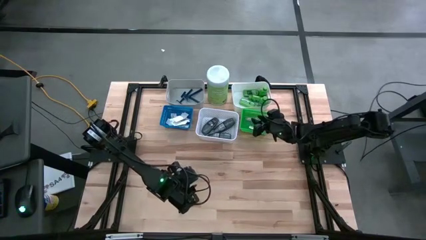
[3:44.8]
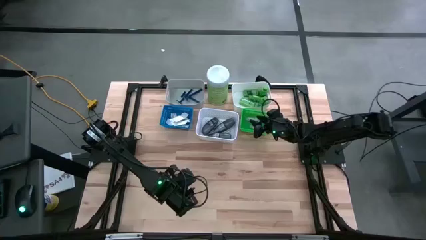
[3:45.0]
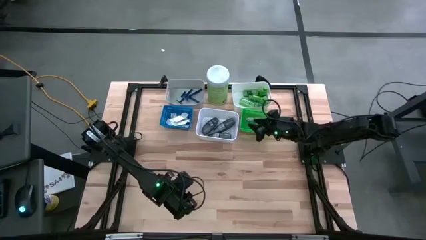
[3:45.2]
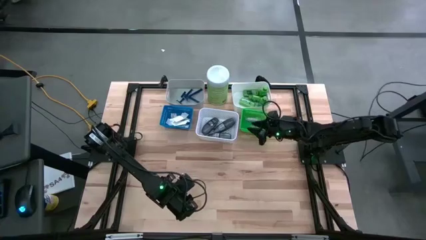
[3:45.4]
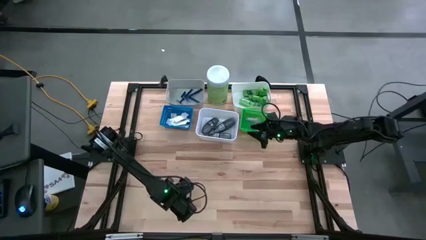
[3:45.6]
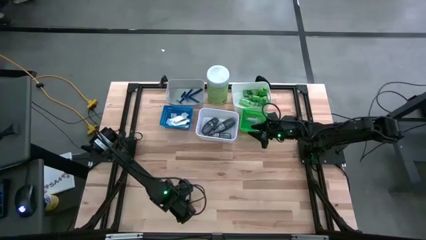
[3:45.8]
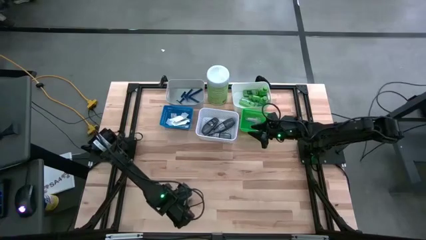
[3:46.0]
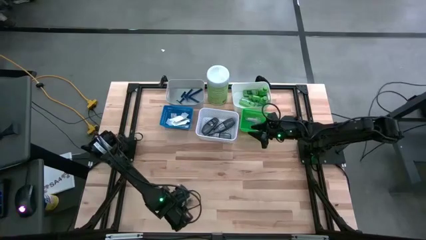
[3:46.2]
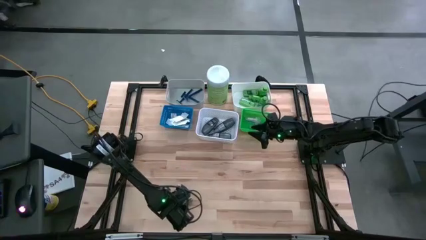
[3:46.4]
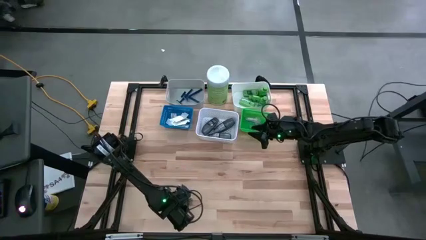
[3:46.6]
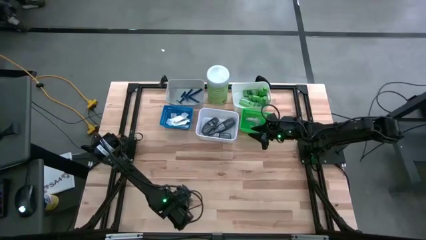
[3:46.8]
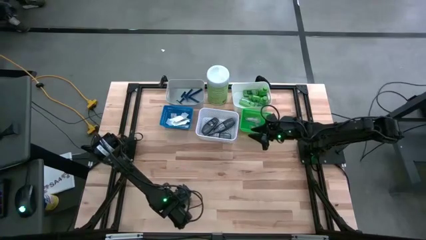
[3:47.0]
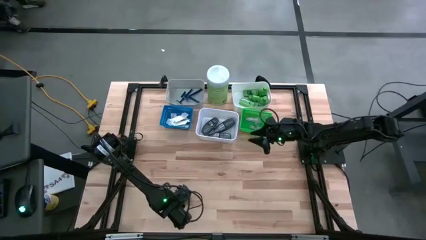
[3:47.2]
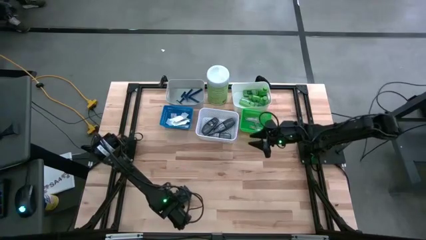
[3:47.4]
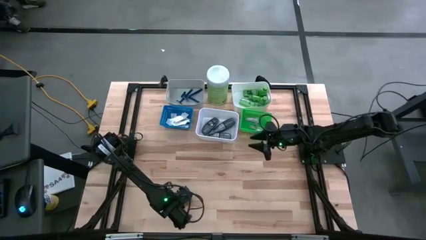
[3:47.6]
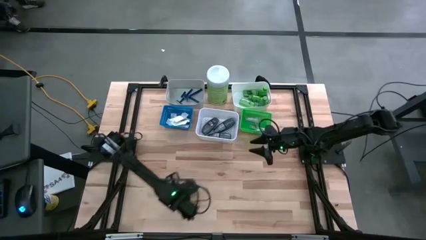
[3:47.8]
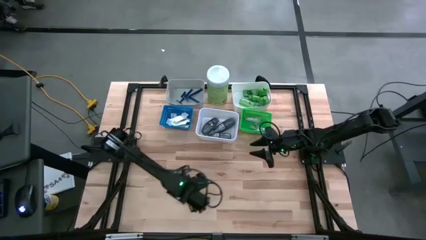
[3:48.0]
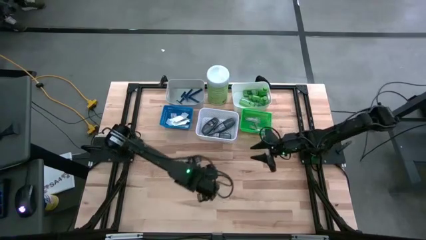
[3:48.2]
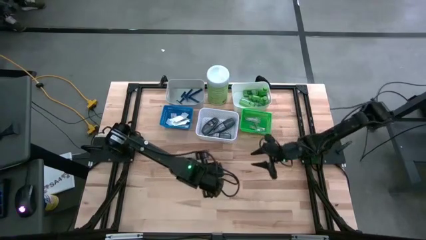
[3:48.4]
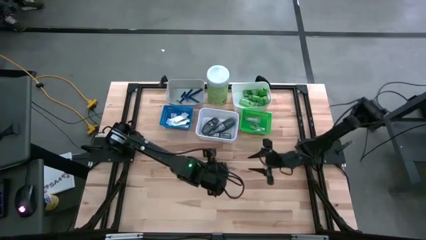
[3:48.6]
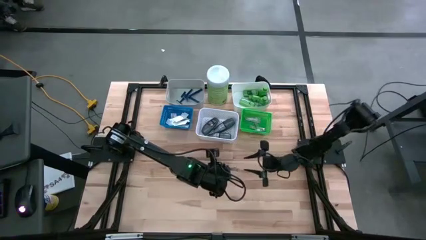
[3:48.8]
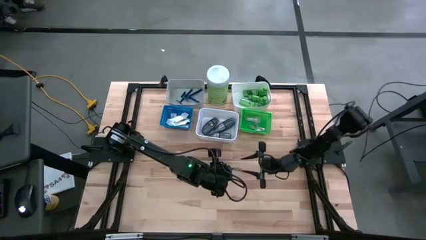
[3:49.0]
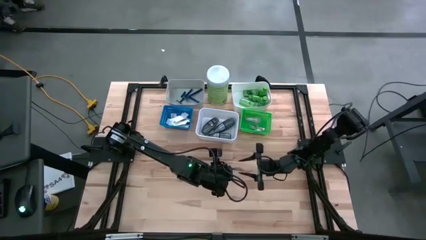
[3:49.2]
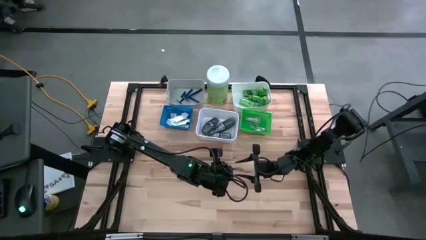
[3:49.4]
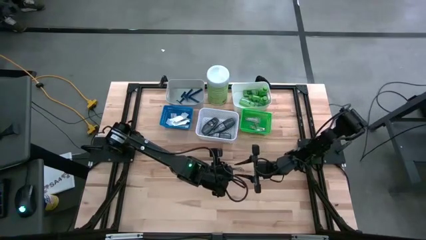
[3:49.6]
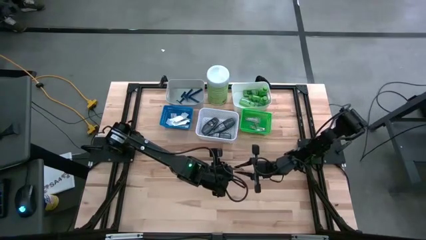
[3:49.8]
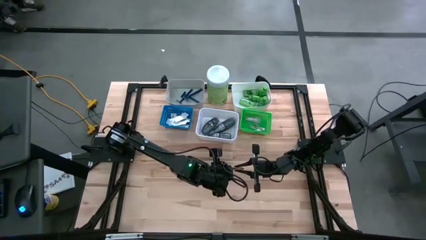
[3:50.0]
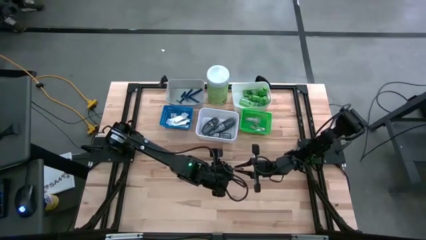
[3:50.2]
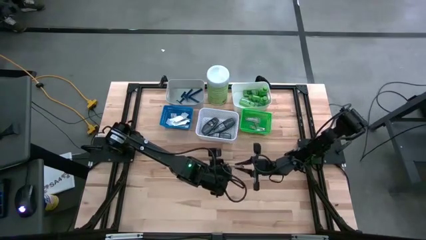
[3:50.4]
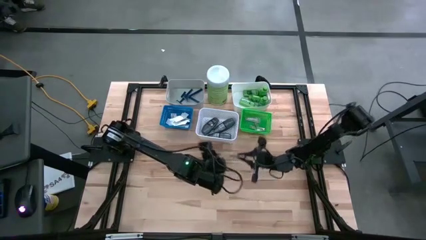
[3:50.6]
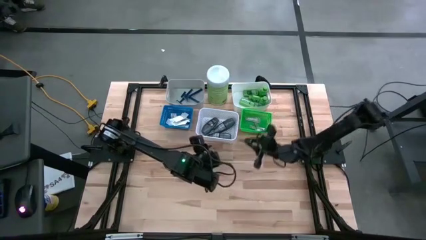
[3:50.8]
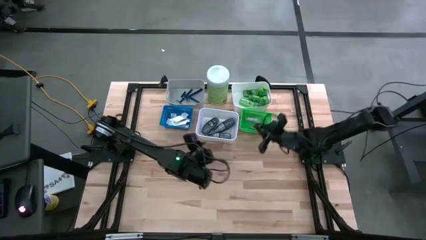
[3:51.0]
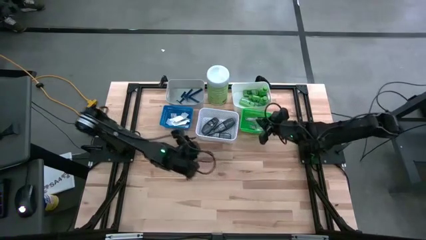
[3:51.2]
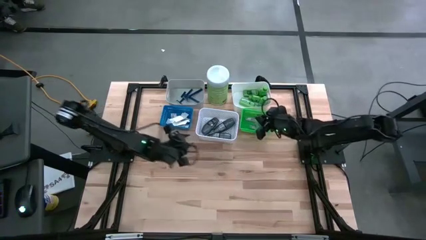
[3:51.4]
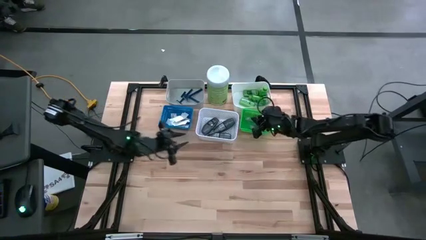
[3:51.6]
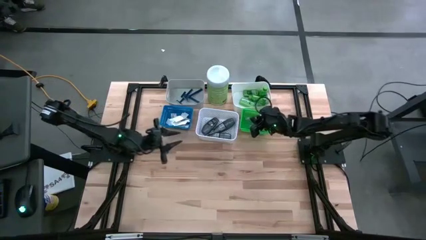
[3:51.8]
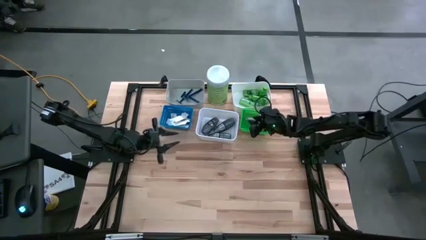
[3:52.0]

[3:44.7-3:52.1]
Task: Pick & Place Travel size toiletries
Put the silver nail cutter into the green bin

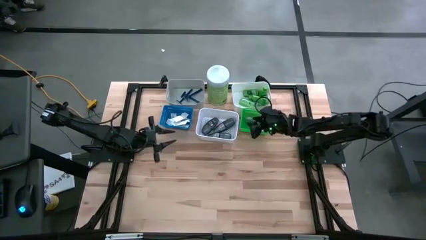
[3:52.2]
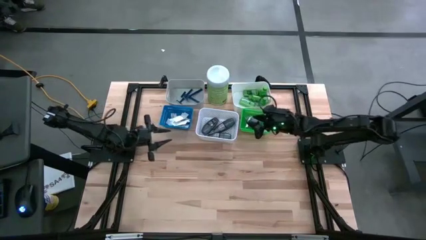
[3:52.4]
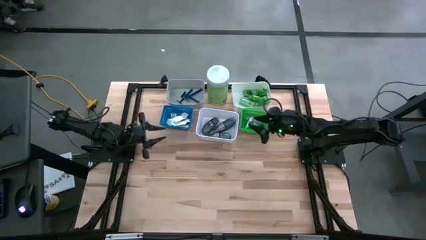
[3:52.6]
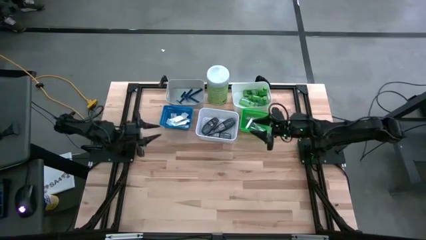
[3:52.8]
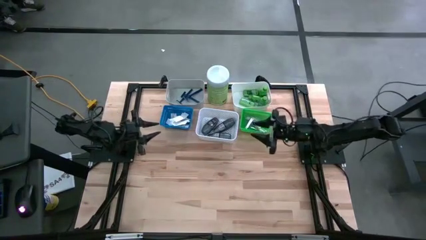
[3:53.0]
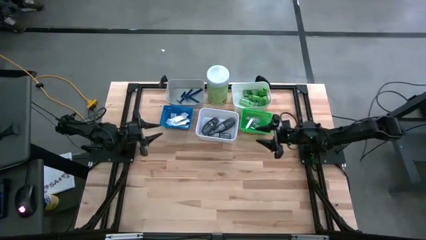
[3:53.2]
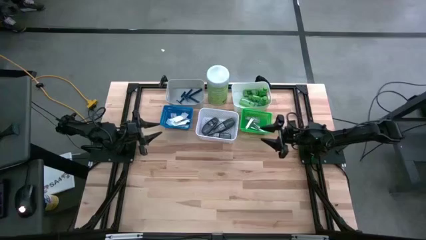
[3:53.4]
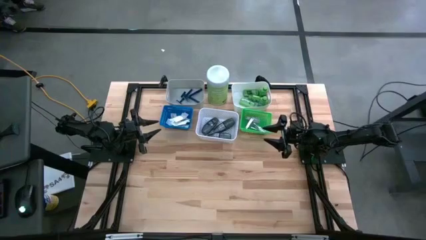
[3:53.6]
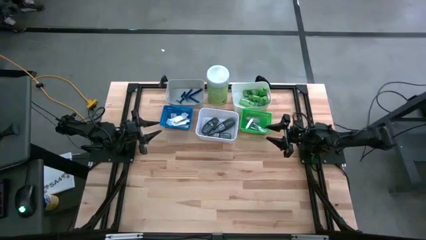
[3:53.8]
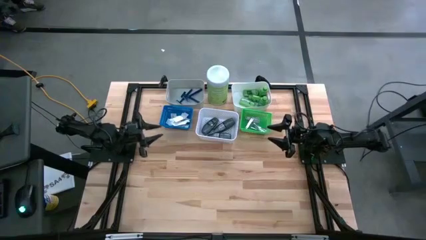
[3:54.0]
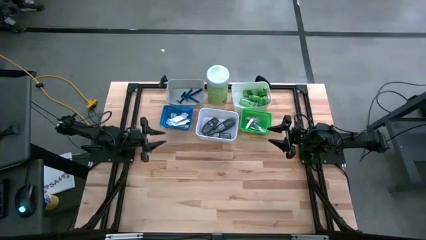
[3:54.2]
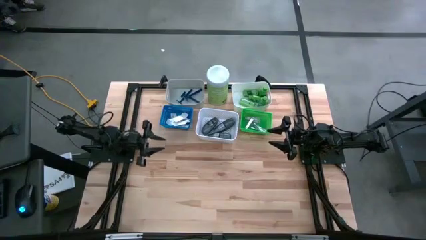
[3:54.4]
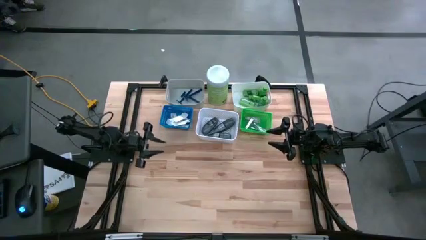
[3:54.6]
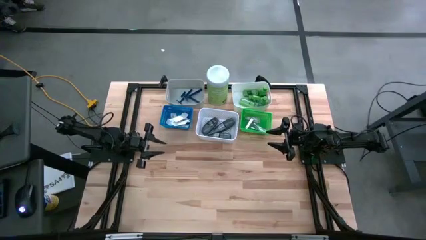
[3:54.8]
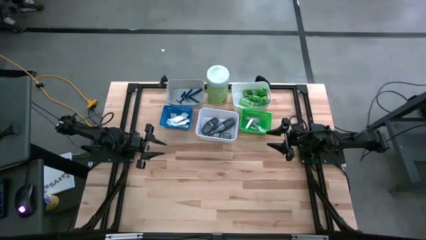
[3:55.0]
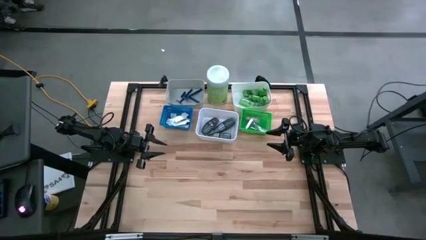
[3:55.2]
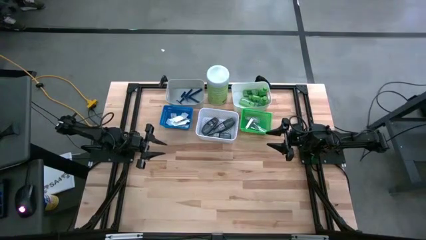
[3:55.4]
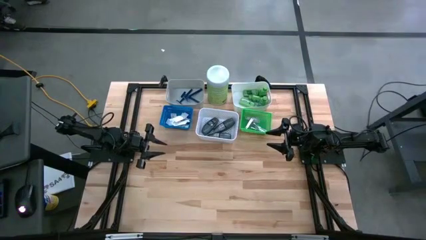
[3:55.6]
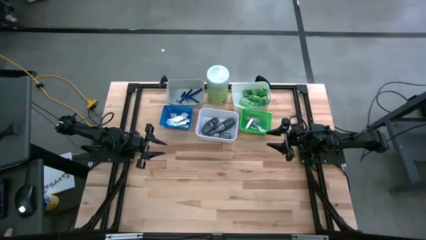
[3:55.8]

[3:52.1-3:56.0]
Return to Home Position
